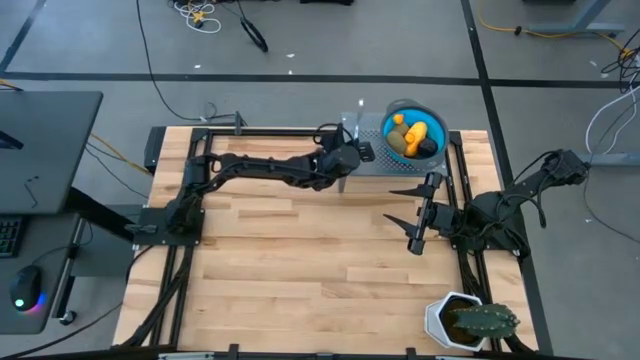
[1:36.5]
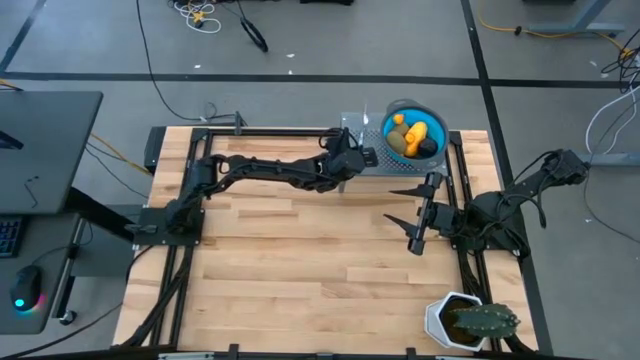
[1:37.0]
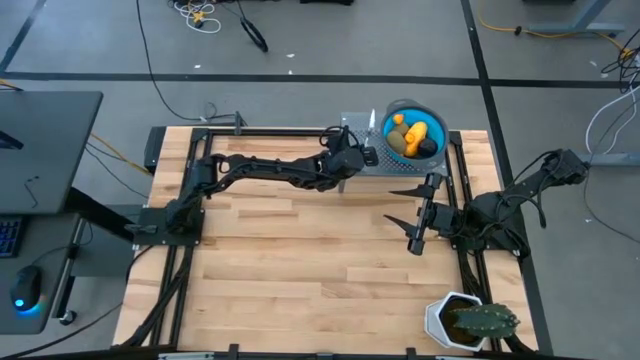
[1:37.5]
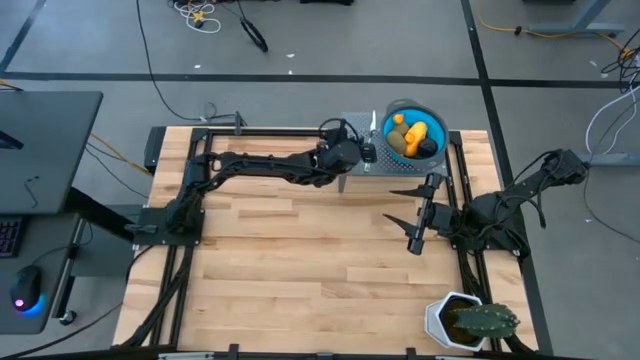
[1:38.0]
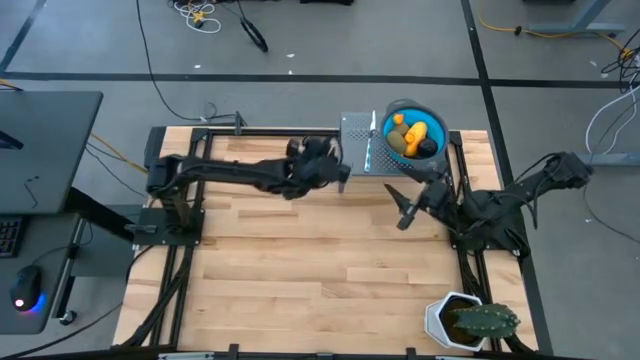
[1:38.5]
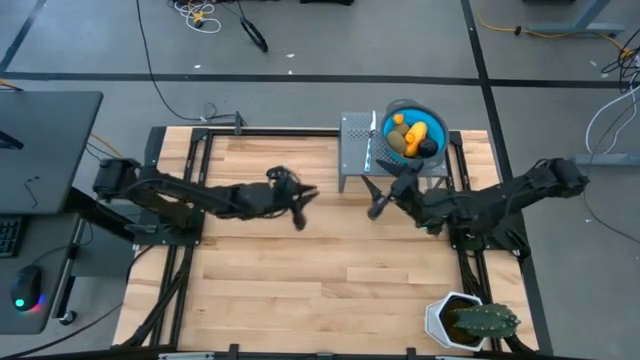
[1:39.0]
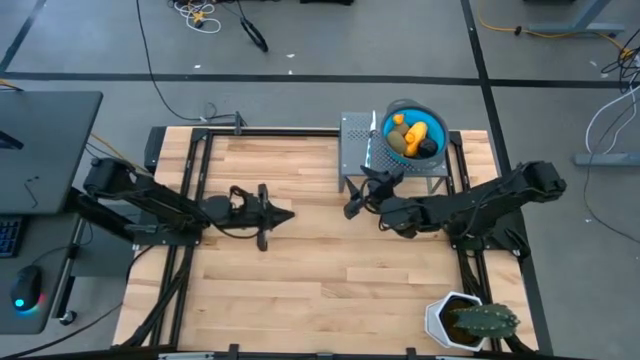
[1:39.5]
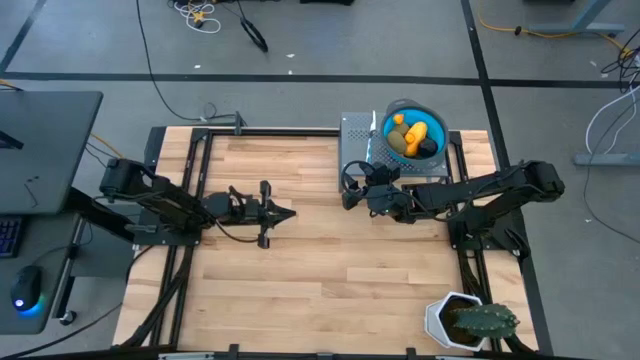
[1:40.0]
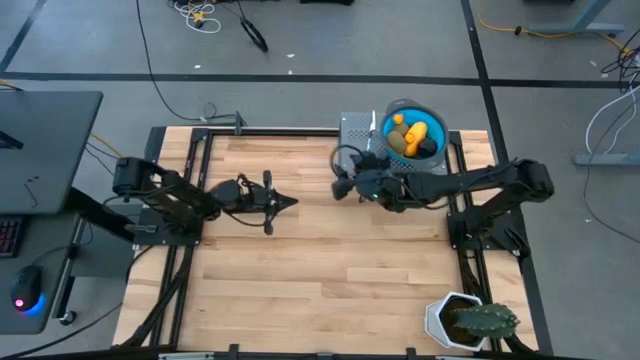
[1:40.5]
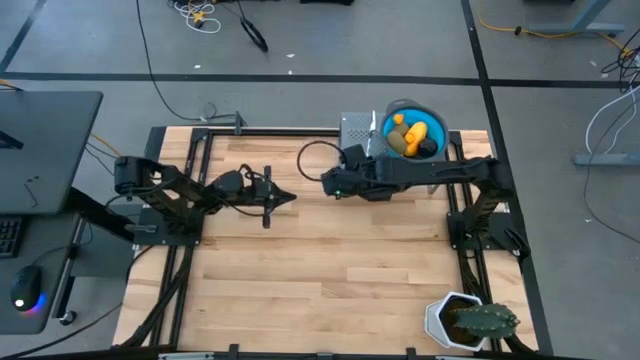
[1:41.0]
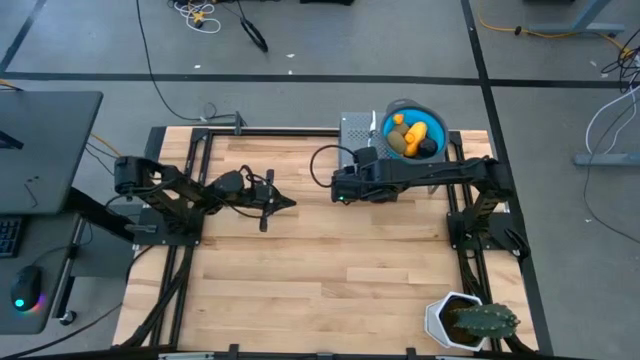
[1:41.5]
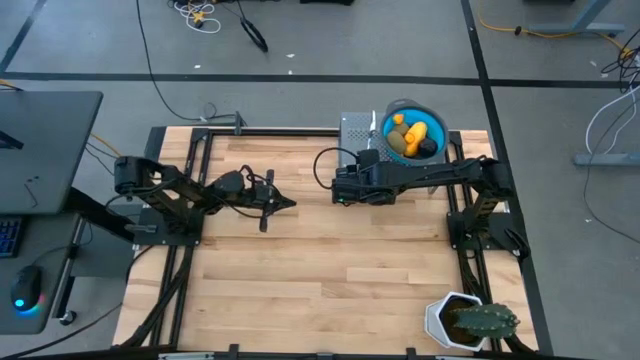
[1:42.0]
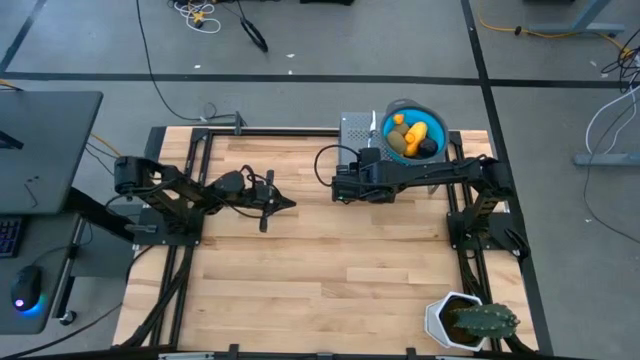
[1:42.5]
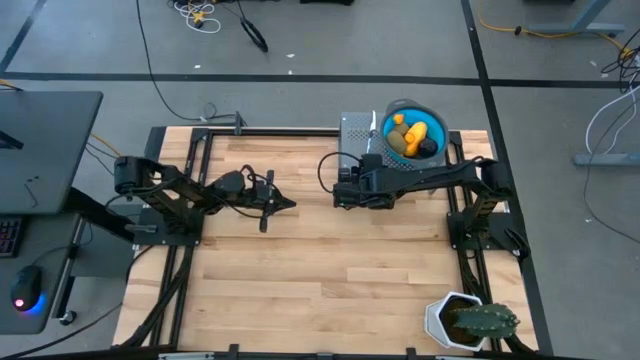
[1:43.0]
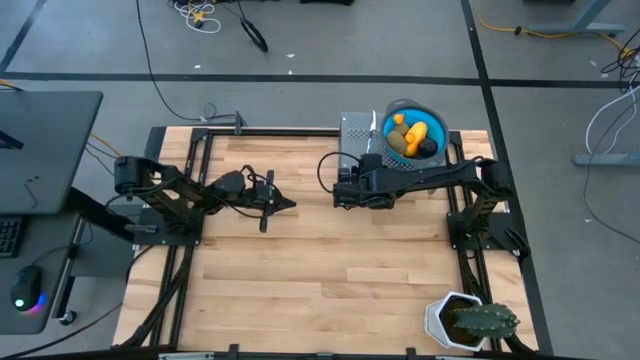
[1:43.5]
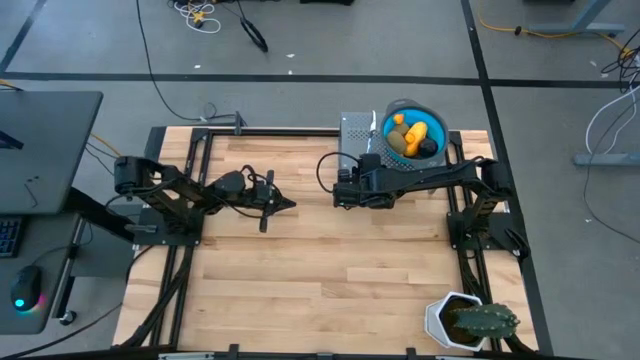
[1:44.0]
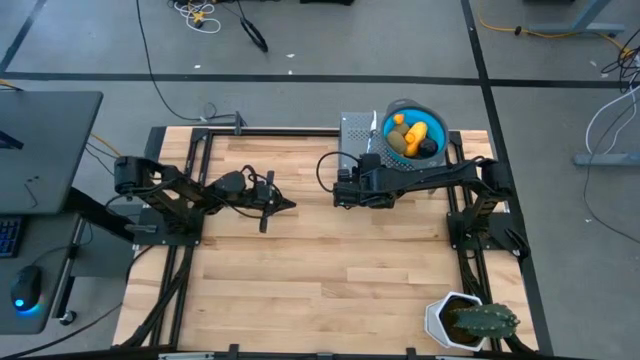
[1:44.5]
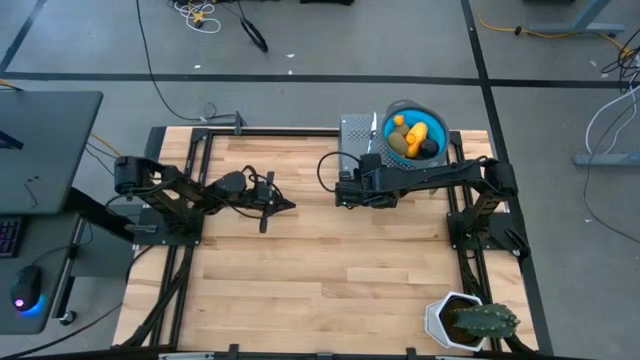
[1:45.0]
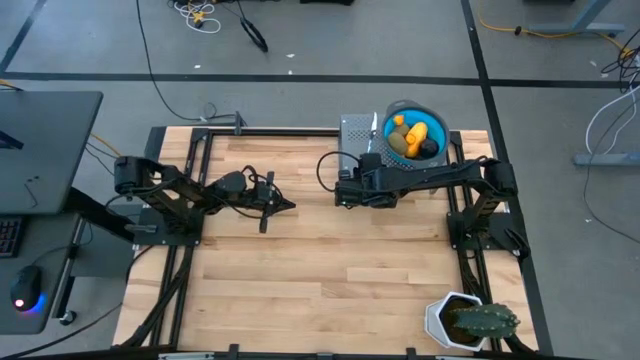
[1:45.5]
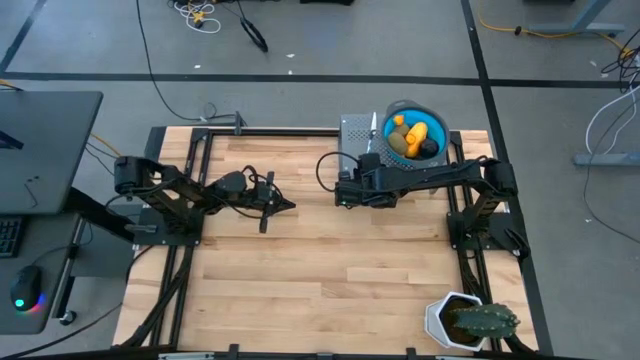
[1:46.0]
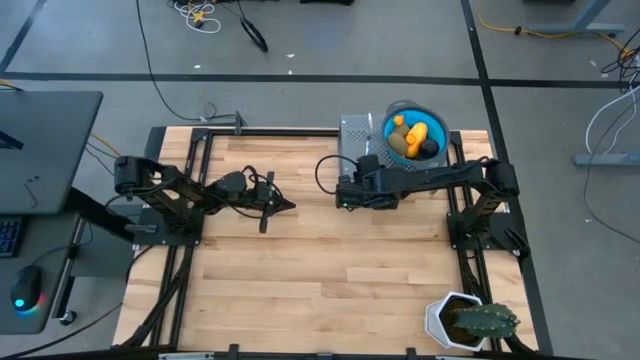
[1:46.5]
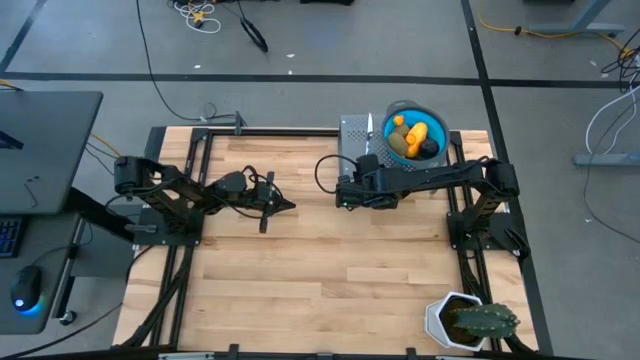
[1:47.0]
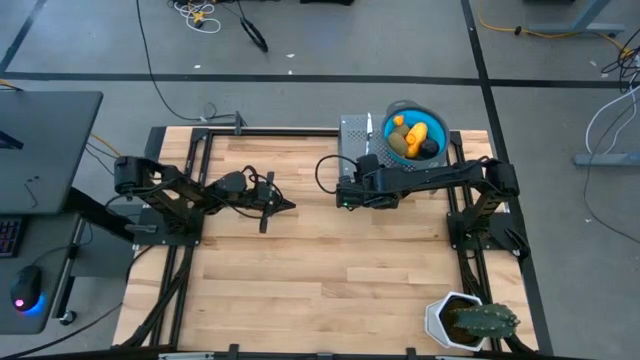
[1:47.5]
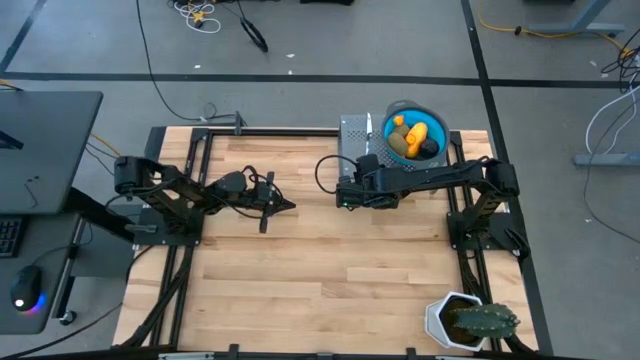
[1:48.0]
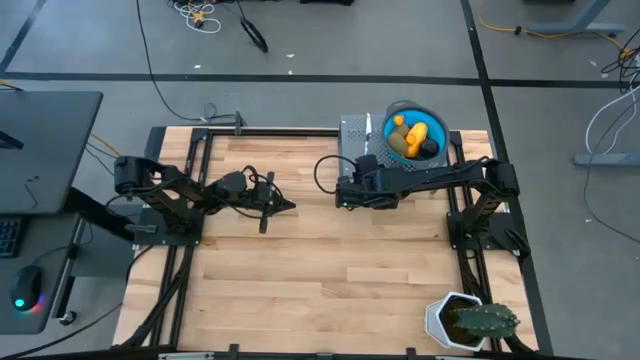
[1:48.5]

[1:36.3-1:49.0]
Task: Pick & Place Fruit
Put the blue knife on the shelf to the left of the blue strainer bowl

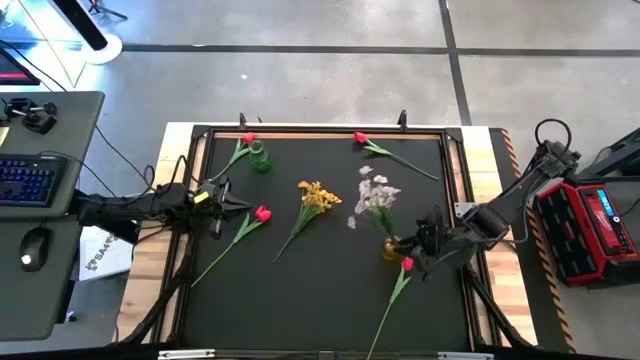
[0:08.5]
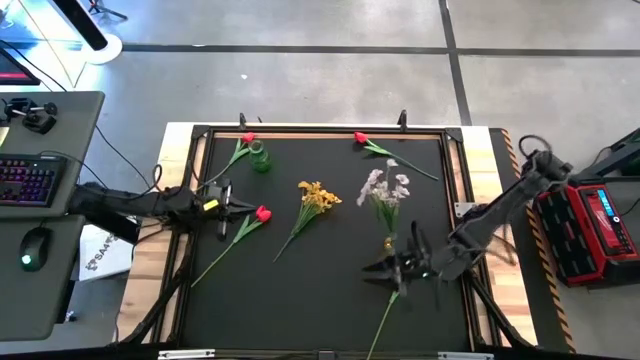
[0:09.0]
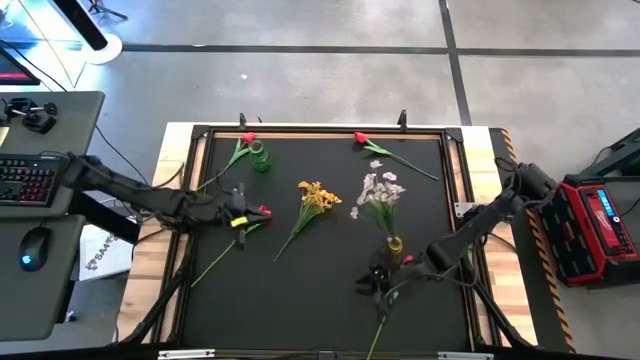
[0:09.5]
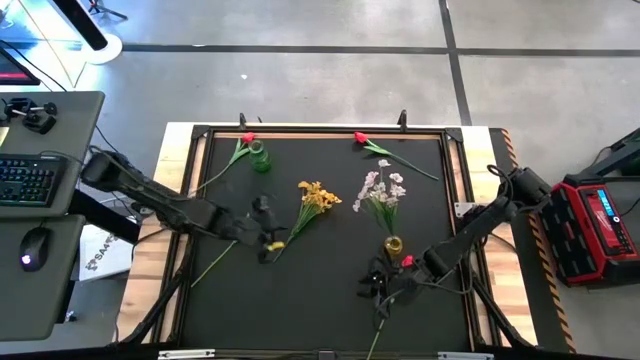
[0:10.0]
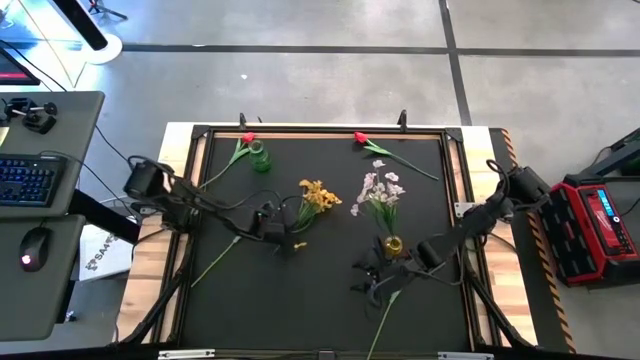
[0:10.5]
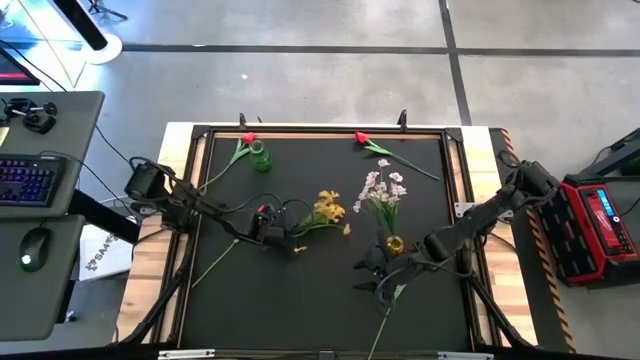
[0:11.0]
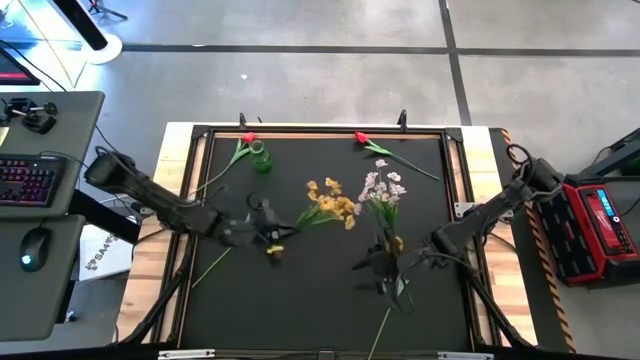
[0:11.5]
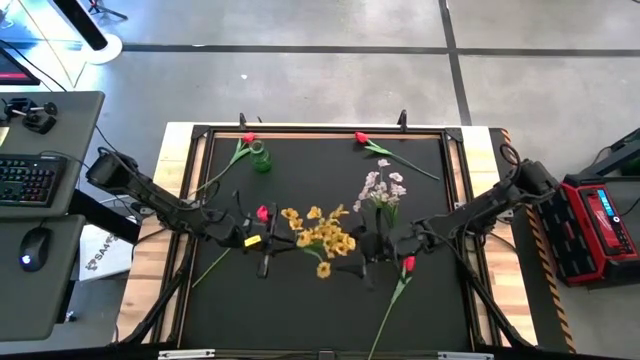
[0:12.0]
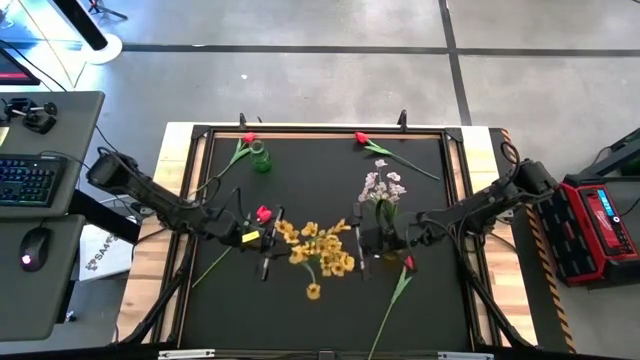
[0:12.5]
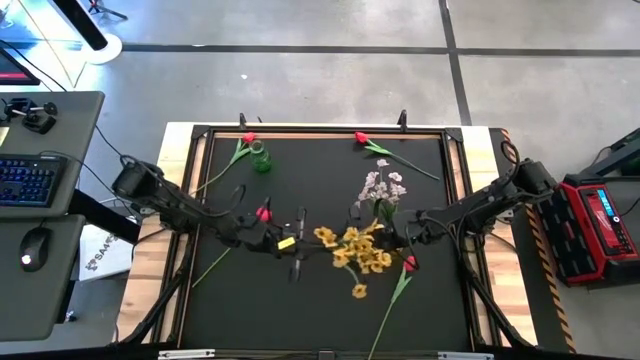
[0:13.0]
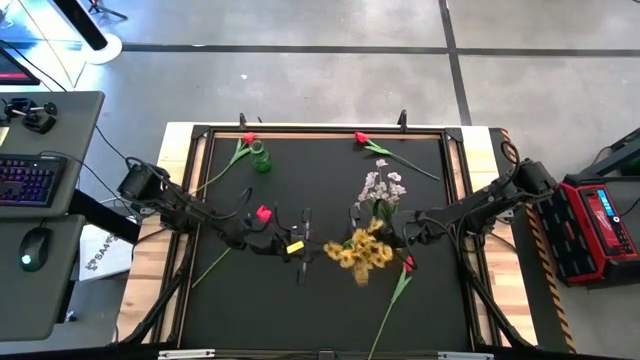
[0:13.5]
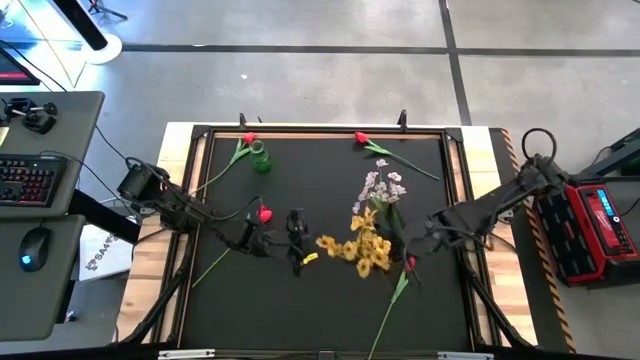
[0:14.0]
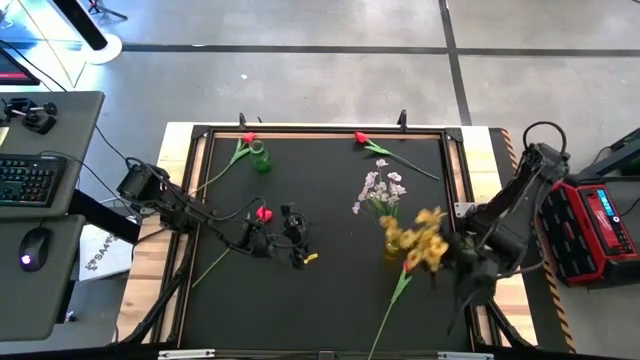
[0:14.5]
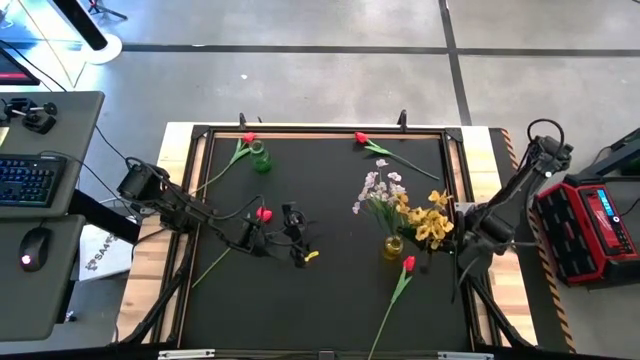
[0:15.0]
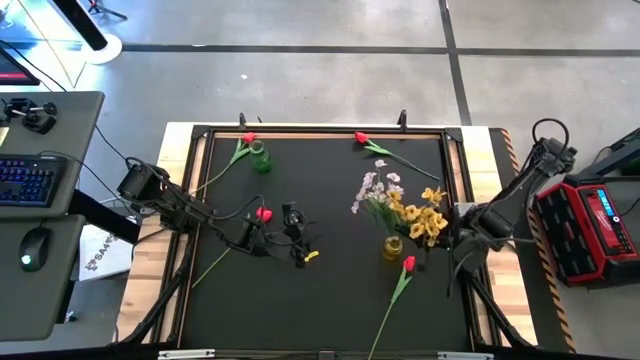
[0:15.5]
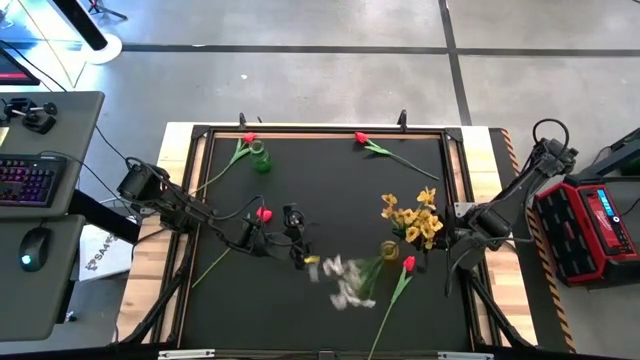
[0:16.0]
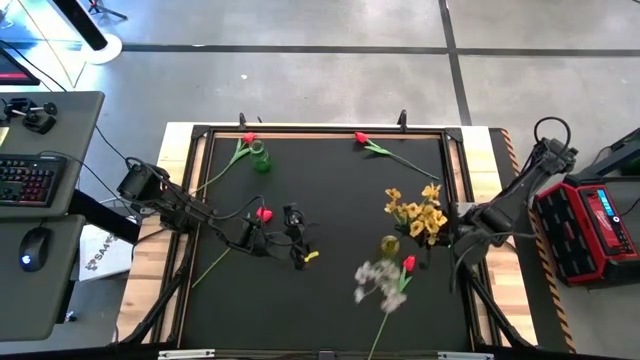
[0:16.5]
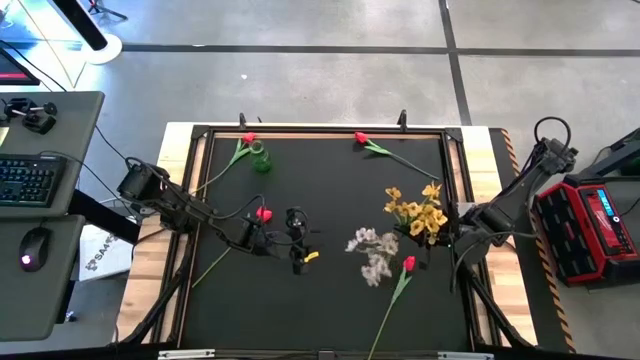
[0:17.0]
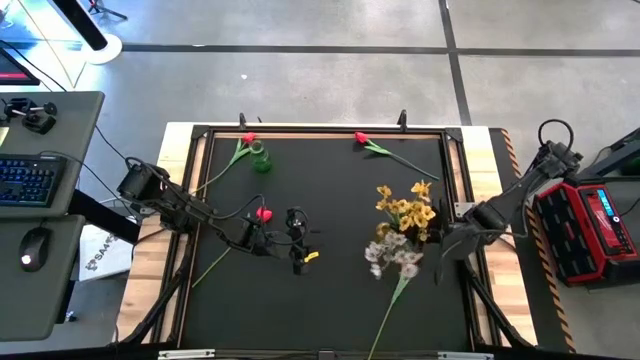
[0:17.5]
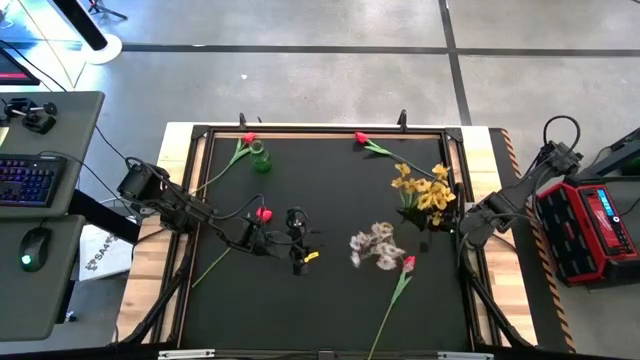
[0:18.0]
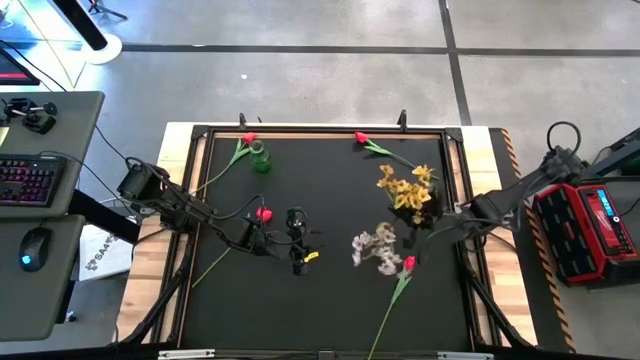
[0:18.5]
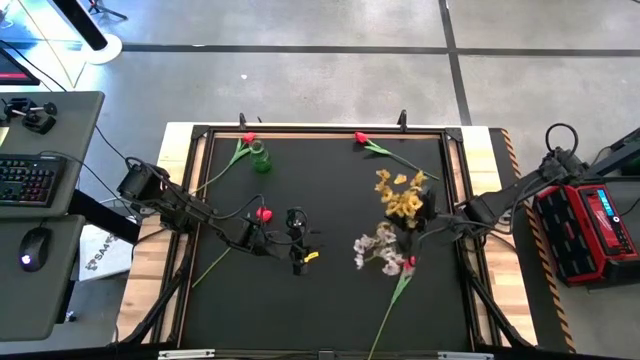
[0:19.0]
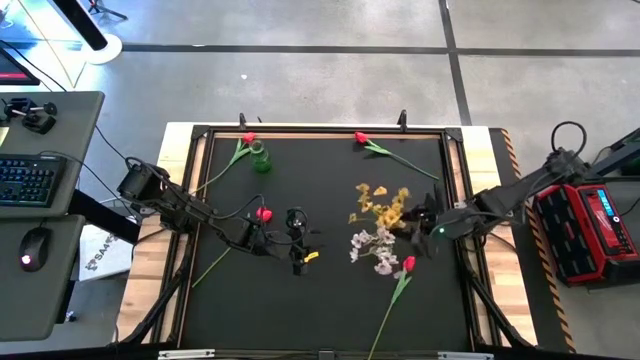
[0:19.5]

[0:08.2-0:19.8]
Task: Sort flowers into vase by color
Put the yellow flowers into the yellow vase
